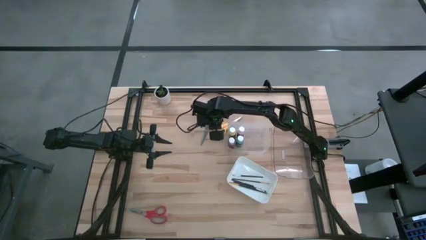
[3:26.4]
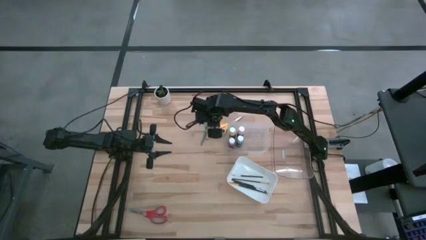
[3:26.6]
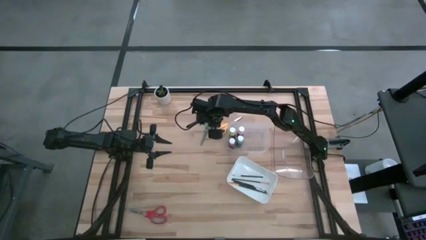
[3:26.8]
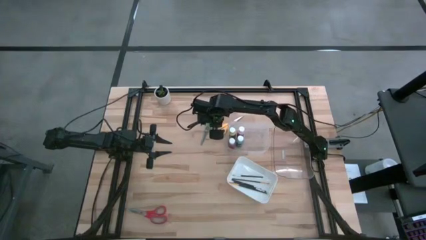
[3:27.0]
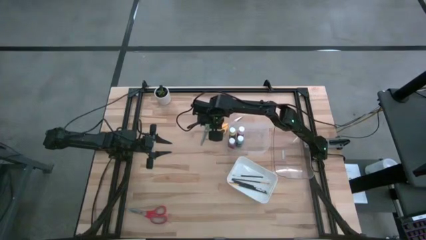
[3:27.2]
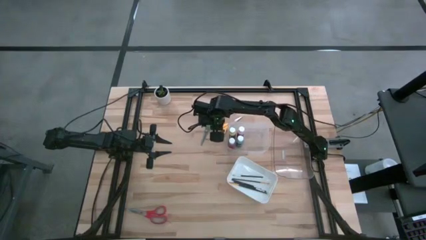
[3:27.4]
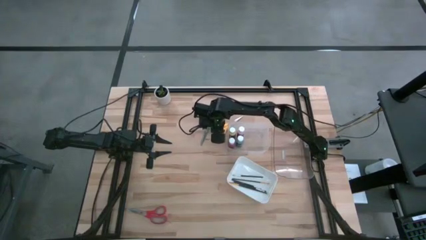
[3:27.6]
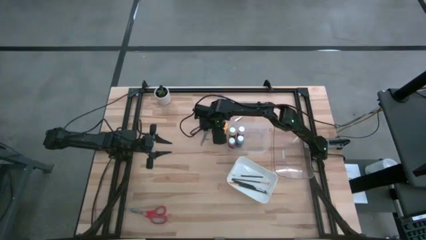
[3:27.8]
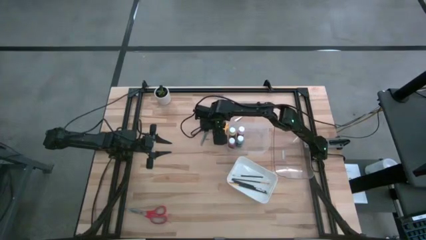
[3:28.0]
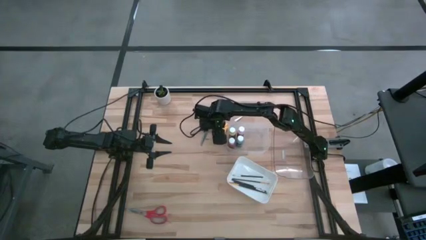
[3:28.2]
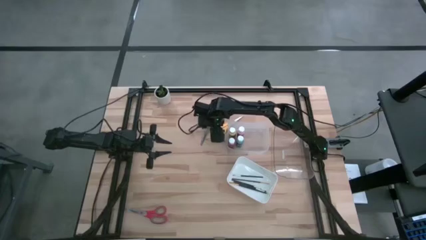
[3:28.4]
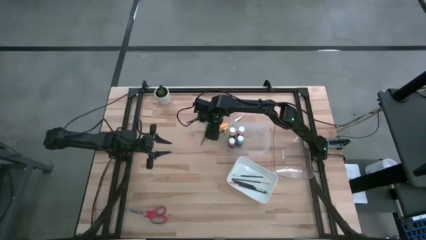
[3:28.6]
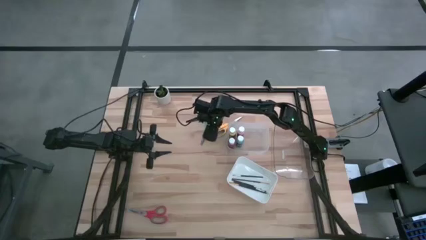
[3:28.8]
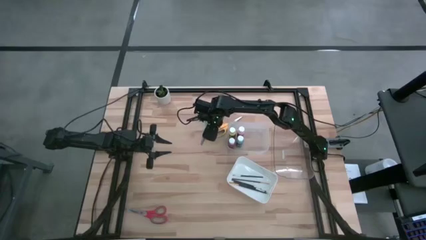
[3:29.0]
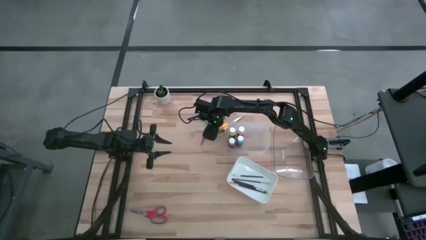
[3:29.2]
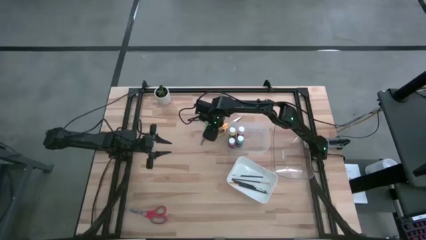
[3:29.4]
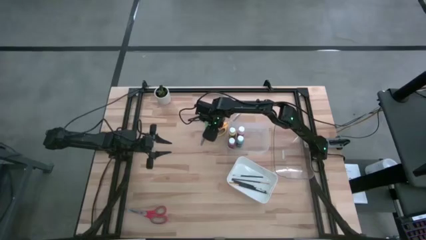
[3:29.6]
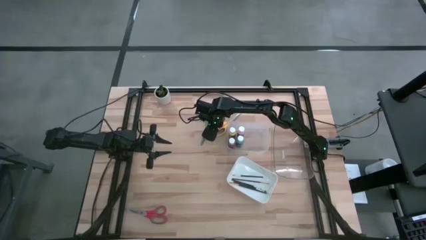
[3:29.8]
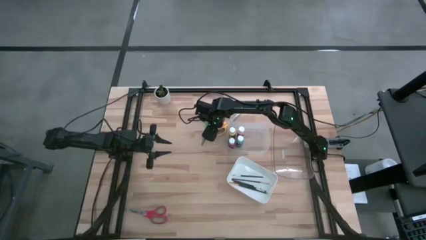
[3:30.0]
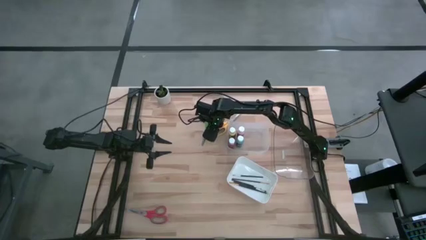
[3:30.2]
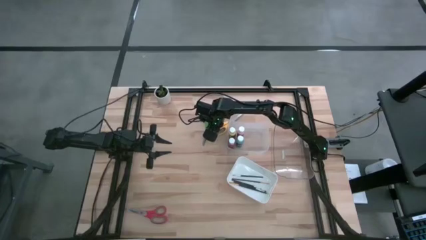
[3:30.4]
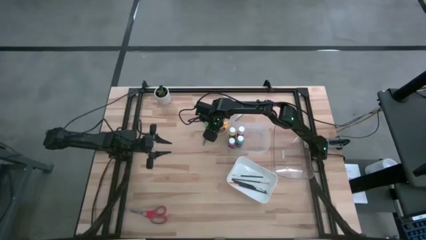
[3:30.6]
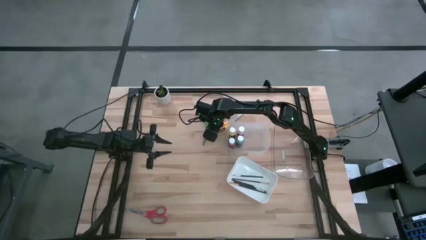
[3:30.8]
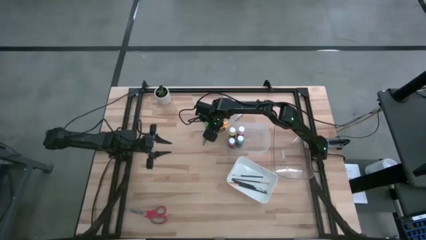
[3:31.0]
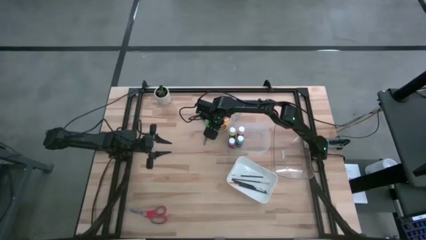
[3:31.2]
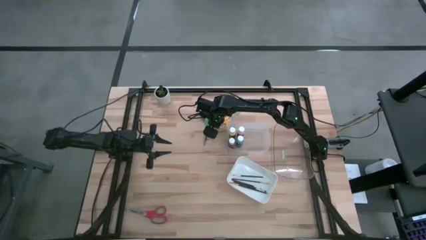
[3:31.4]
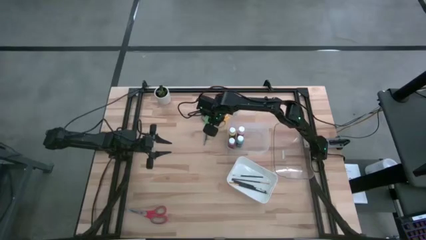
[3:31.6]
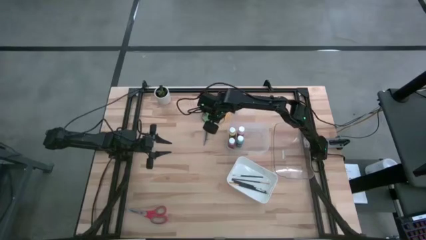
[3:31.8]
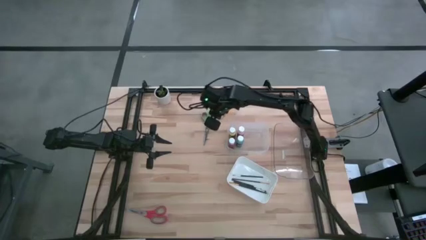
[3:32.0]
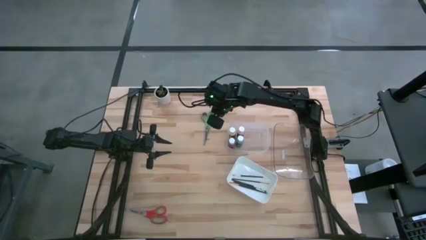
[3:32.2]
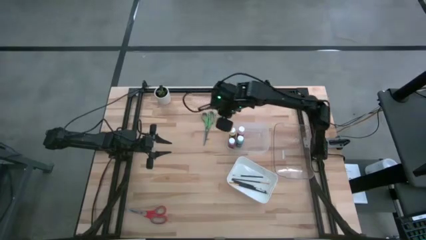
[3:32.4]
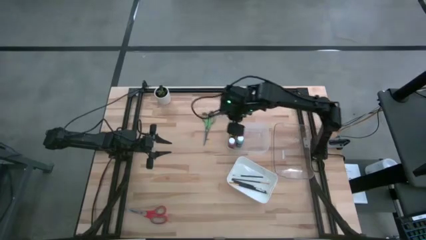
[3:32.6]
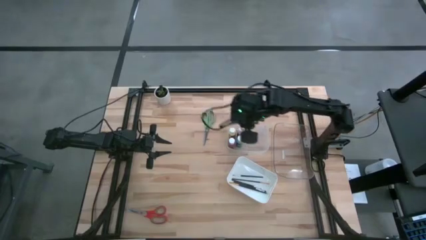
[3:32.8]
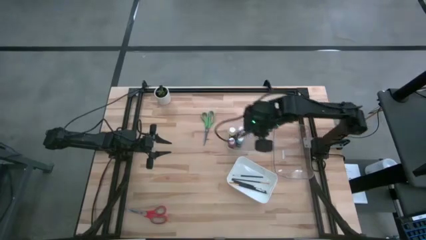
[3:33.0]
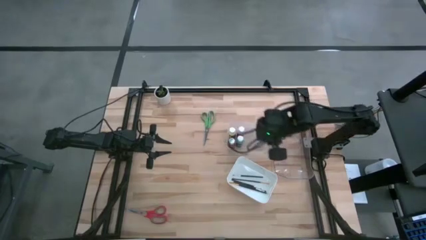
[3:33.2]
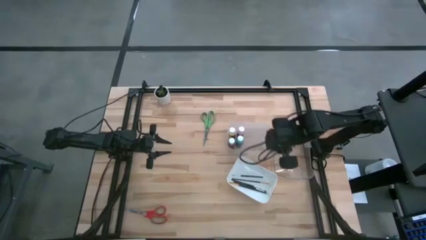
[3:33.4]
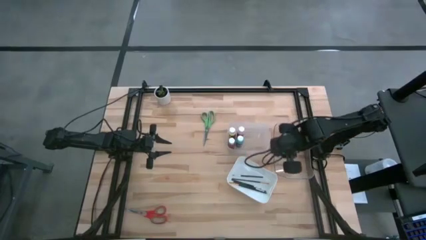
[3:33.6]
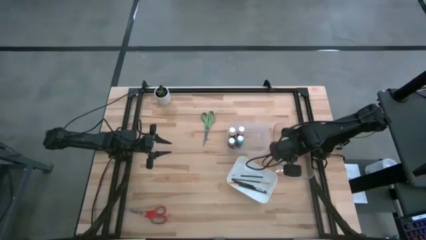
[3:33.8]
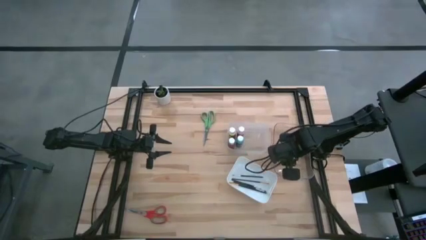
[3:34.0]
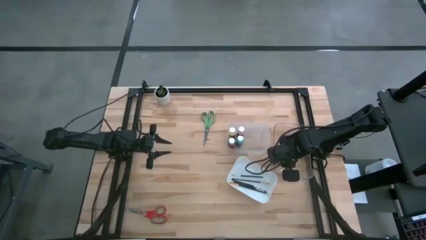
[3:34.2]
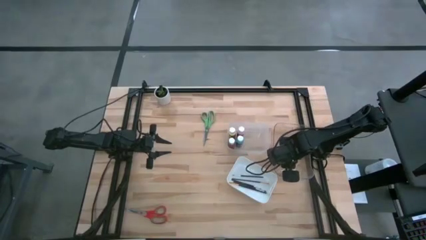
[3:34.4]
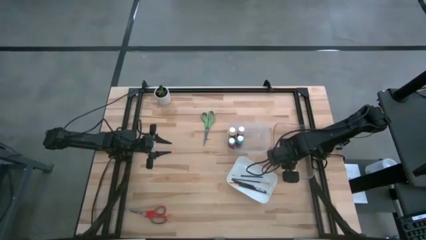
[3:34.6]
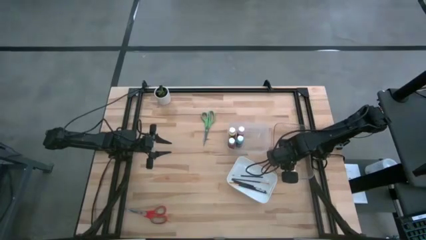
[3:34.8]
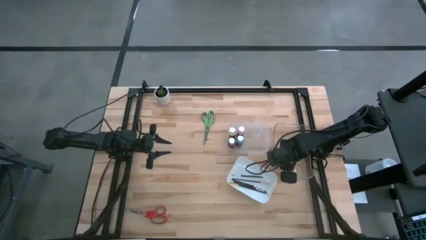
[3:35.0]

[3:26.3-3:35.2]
Task: Pick & Place Paint Supplies
Put the yellow scissors into the right transparent bin

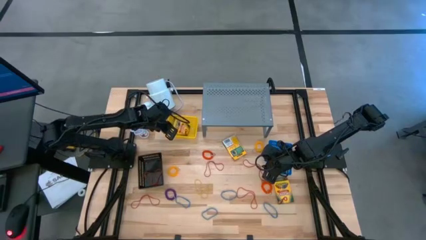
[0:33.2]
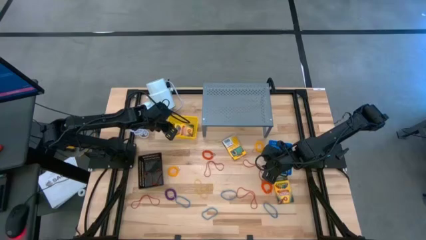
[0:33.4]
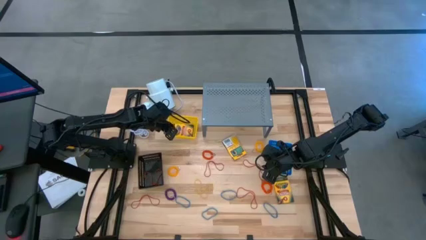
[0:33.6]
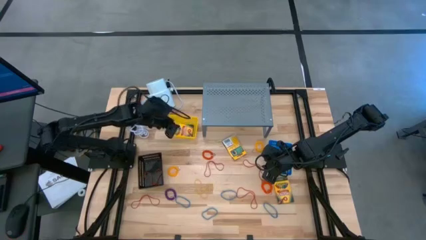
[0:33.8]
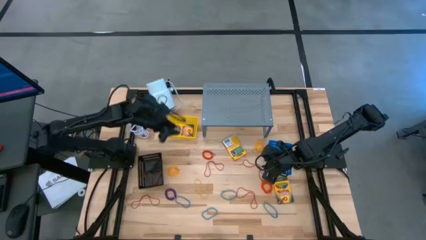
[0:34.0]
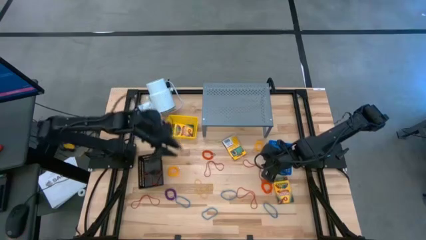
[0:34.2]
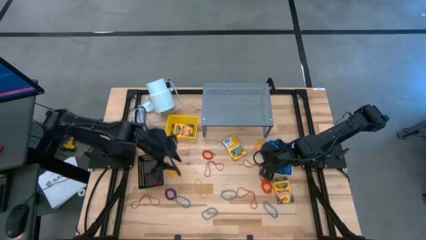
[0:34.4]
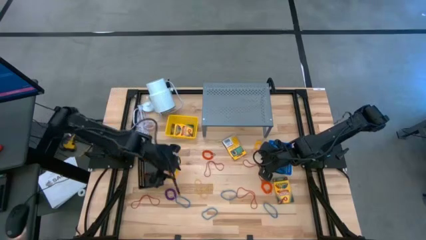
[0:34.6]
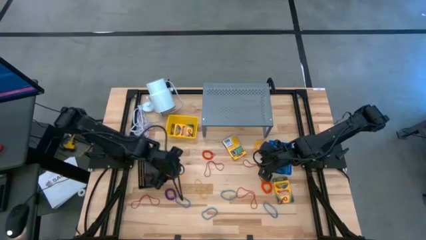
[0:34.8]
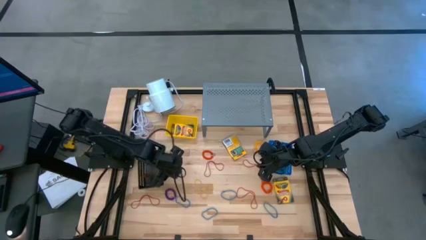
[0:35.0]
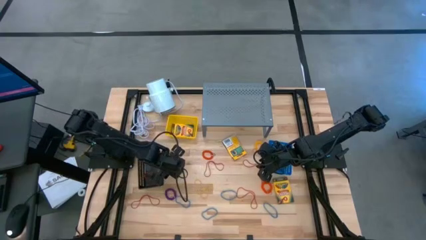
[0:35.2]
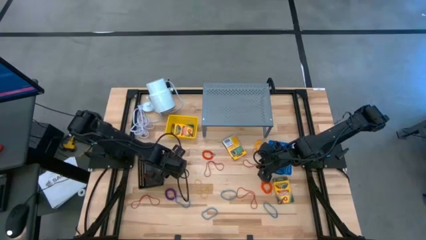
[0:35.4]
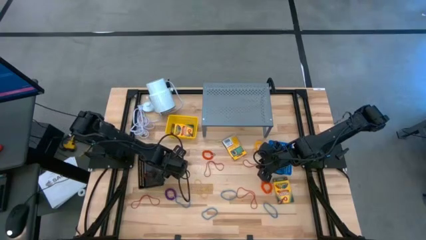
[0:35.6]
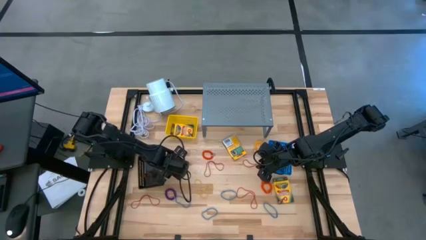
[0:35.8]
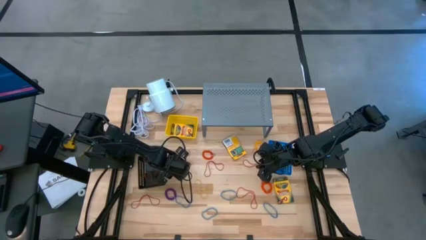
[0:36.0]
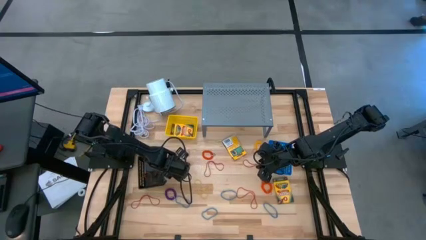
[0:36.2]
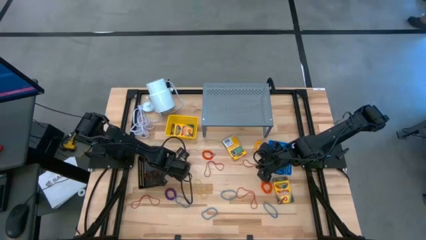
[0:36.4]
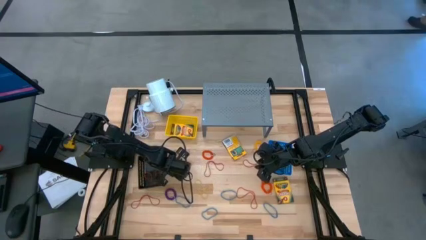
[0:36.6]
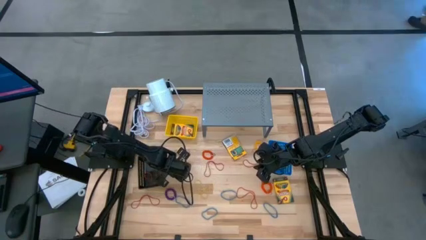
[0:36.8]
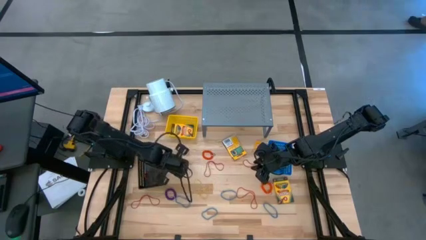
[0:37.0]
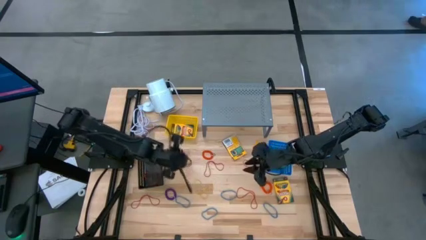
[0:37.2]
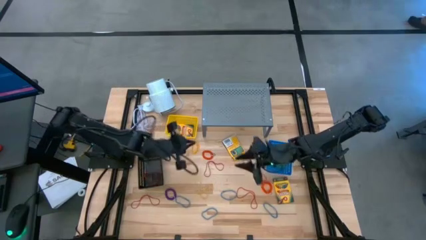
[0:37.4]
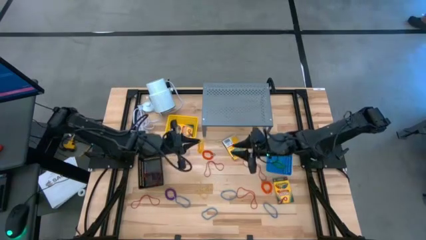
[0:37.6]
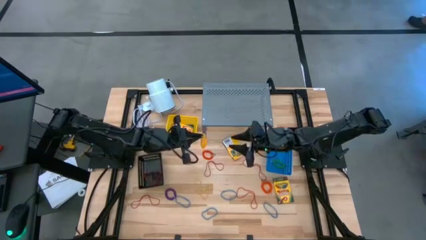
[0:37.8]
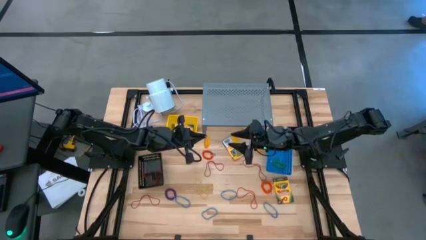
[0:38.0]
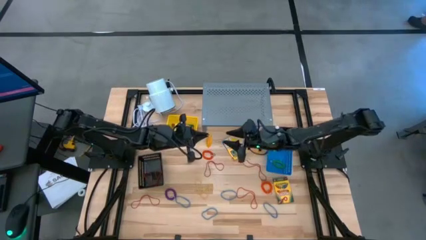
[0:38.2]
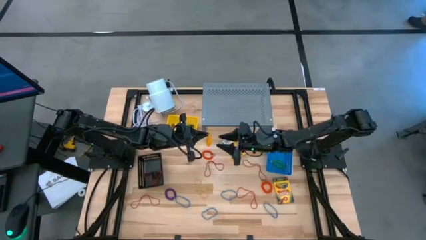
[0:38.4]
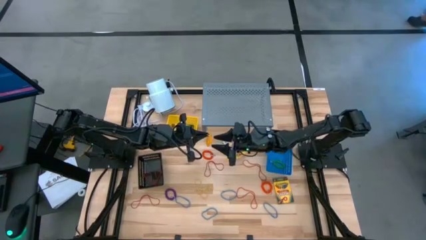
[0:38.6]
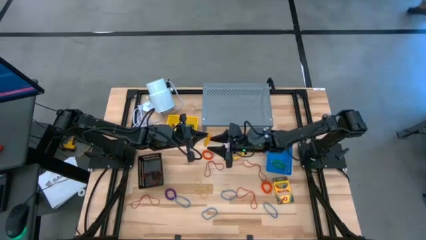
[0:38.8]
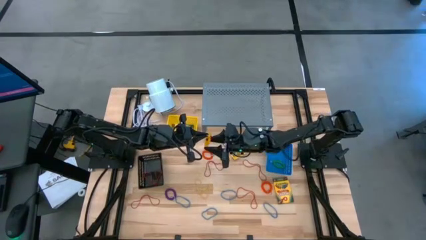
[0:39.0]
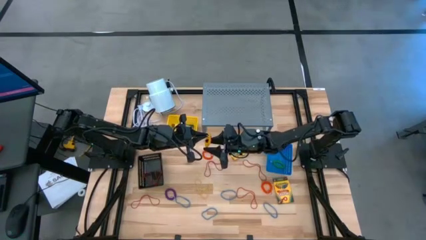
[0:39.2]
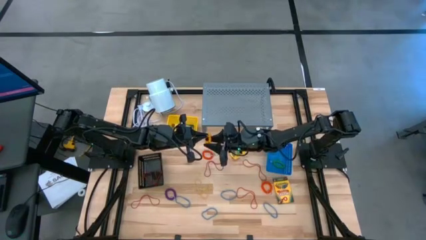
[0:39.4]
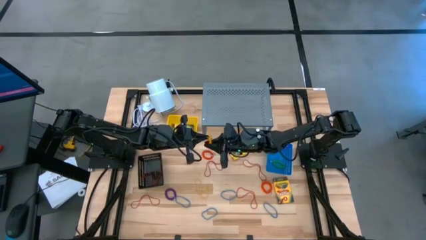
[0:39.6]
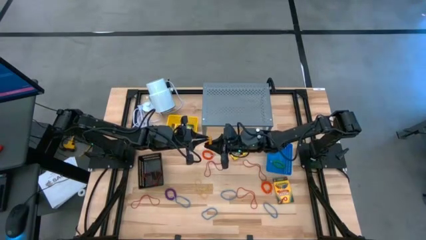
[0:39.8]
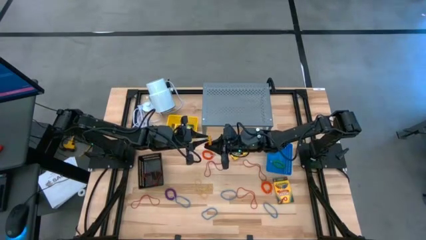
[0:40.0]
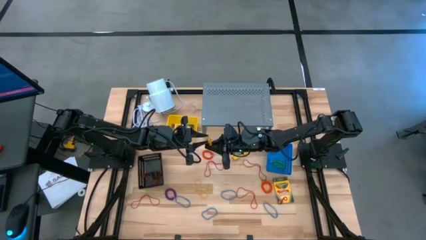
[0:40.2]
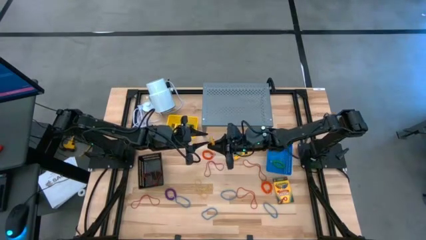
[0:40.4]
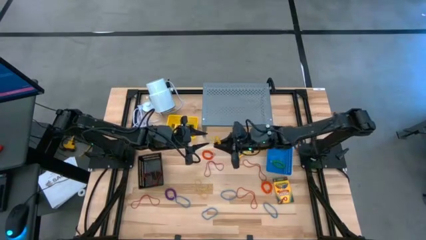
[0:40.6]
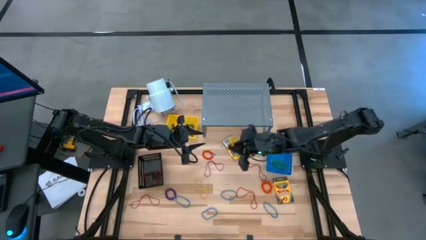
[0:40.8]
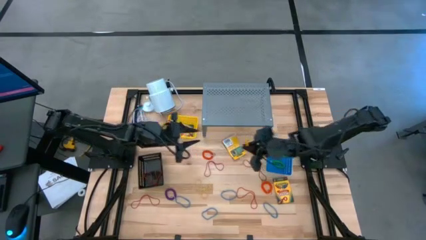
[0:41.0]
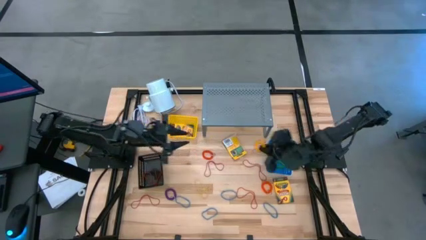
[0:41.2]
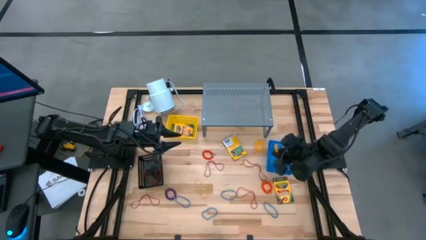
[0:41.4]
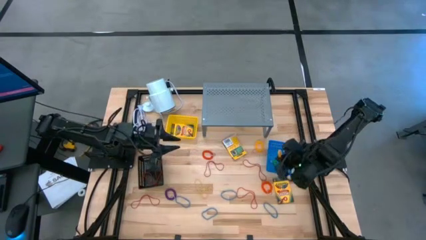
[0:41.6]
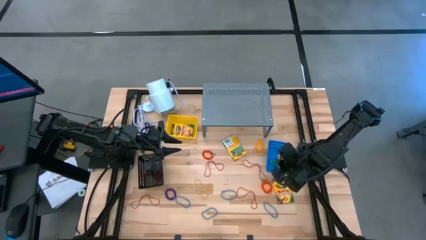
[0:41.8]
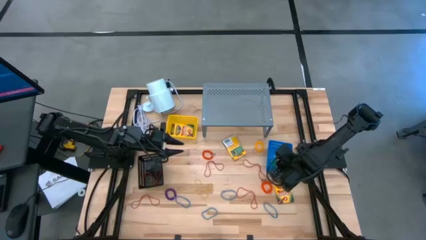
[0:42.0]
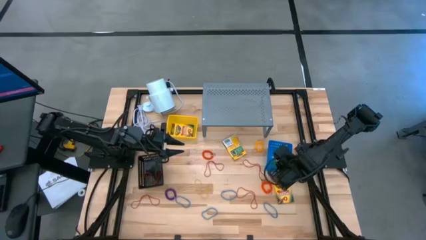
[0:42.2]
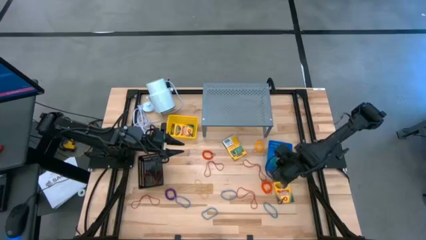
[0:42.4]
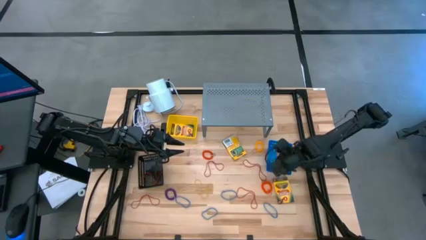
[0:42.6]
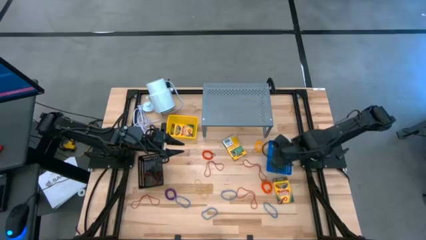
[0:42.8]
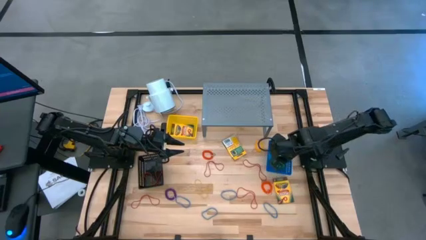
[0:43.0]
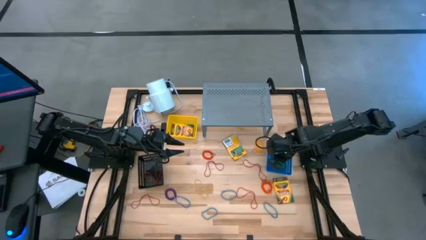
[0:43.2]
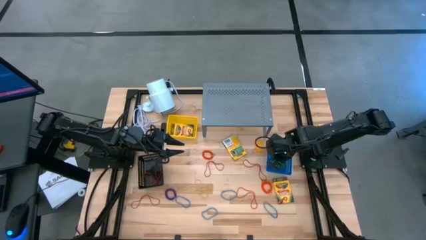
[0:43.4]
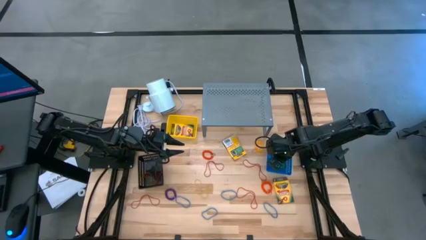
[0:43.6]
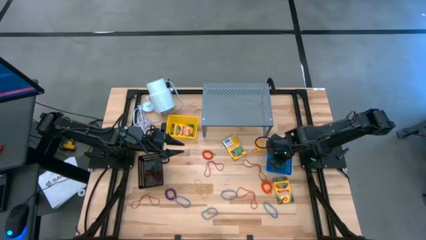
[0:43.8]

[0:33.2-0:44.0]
Task: Pick & Place Office Desk Supplies
Put the yellow spring keychain into the blue bin
